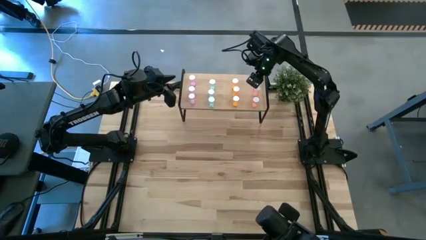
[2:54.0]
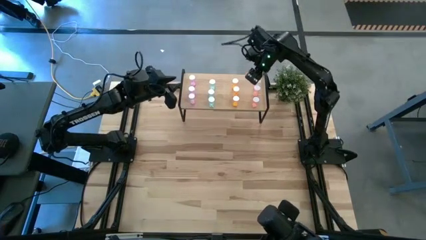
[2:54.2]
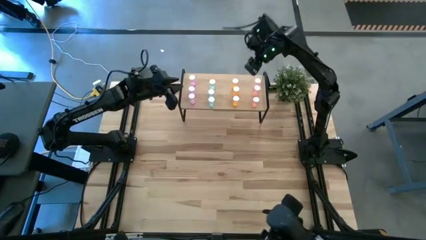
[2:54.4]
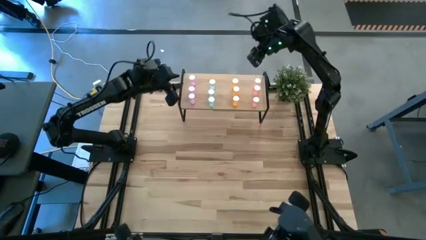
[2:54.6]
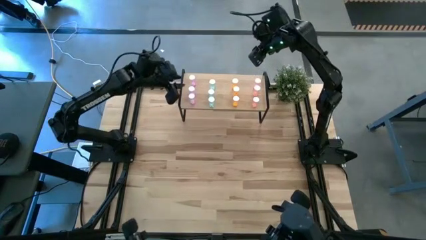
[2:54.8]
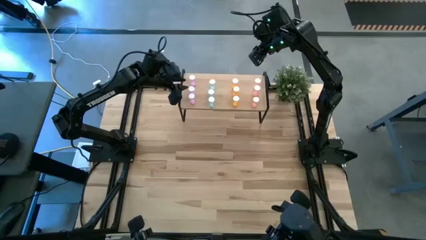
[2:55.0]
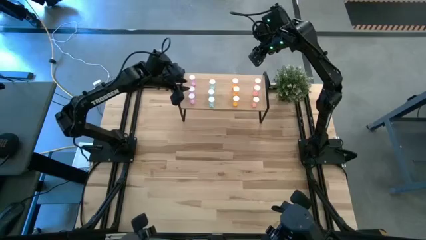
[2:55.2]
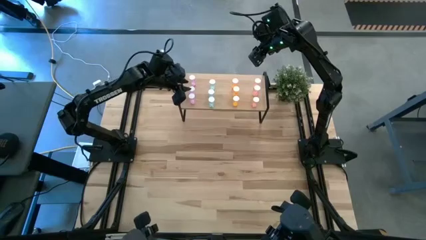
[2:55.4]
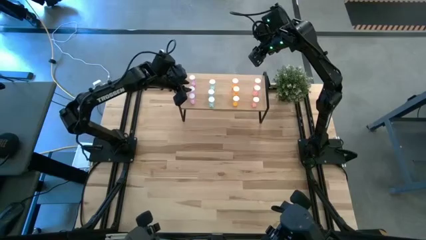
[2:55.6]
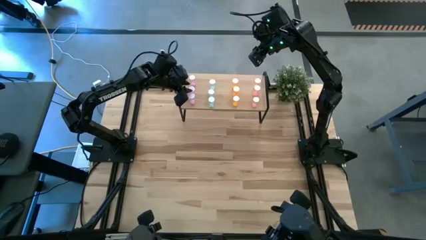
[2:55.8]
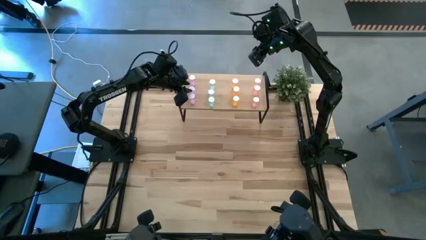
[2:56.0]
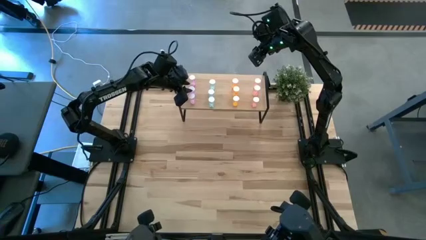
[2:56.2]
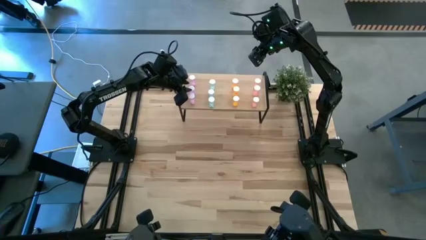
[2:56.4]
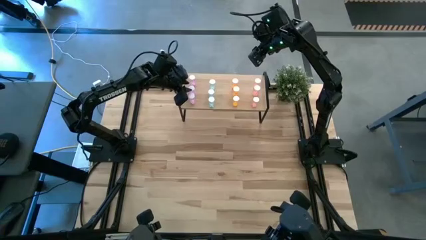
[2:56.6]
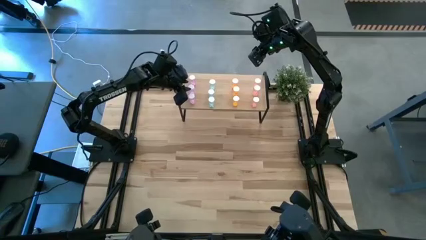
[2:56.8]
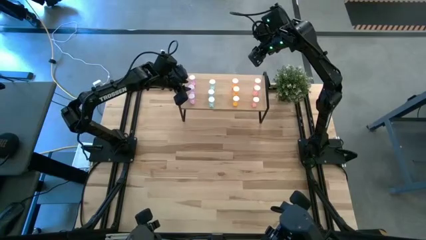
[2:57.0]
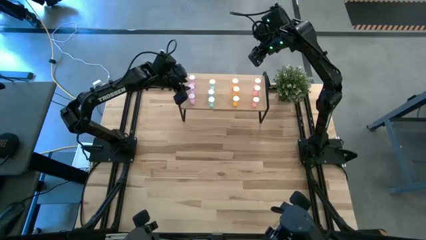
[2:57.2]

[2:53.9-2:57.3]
Task: Pick and place medicine bottles onto shelf by color
Adjust the middle violet pill bottle

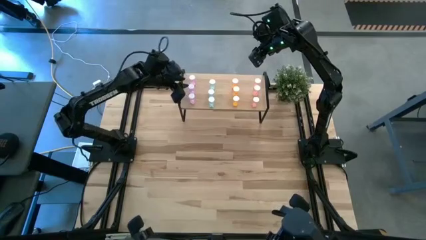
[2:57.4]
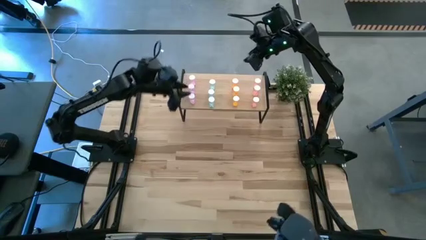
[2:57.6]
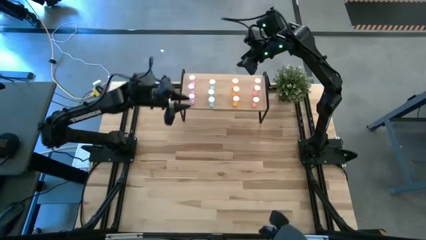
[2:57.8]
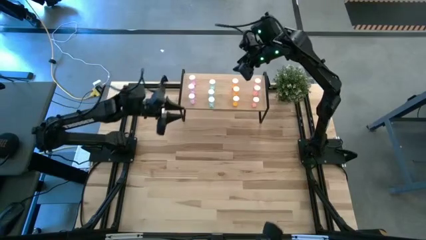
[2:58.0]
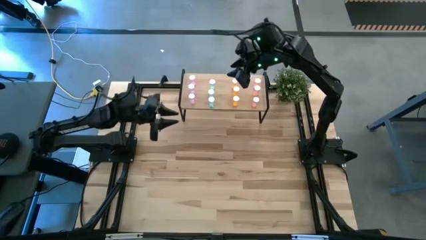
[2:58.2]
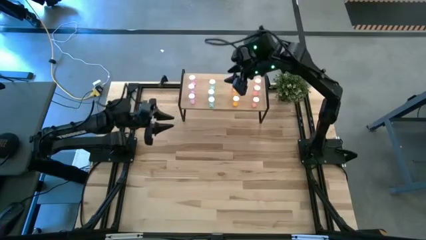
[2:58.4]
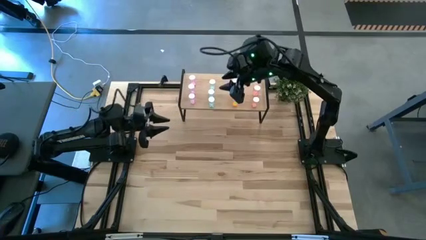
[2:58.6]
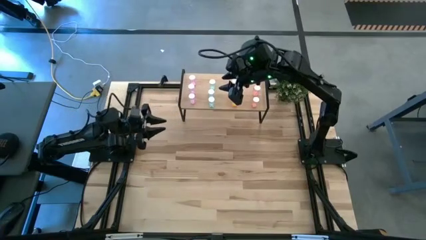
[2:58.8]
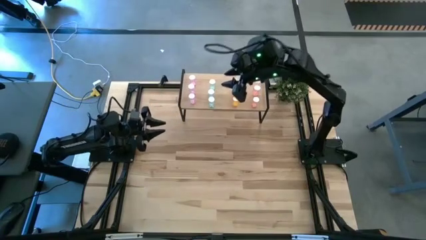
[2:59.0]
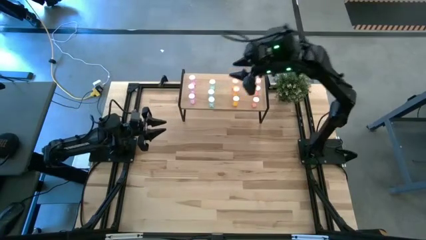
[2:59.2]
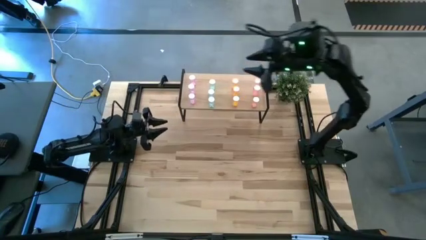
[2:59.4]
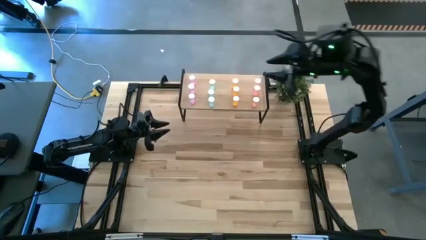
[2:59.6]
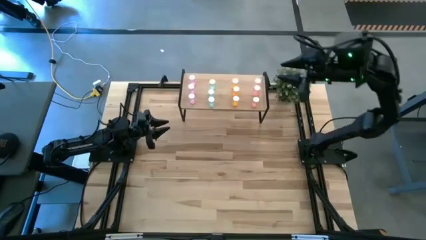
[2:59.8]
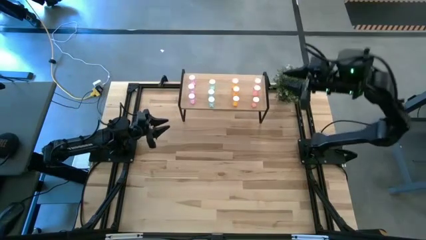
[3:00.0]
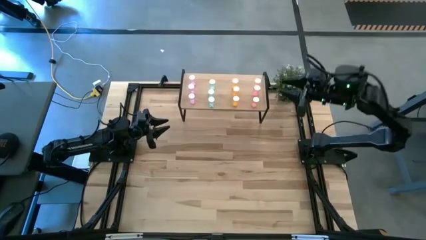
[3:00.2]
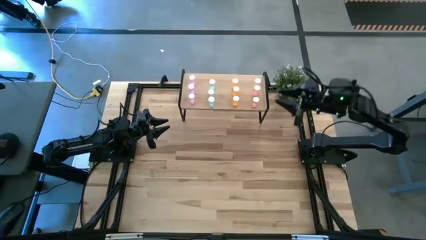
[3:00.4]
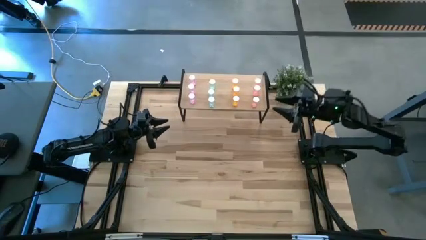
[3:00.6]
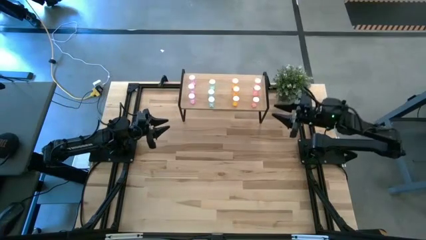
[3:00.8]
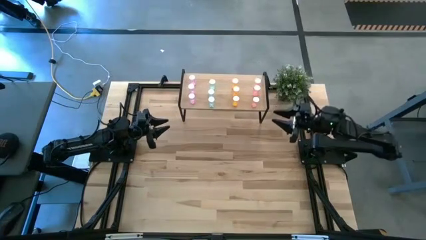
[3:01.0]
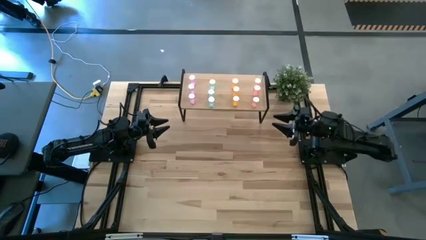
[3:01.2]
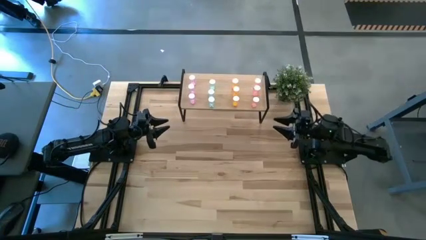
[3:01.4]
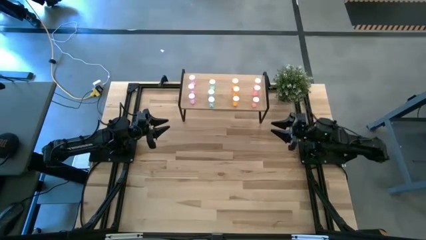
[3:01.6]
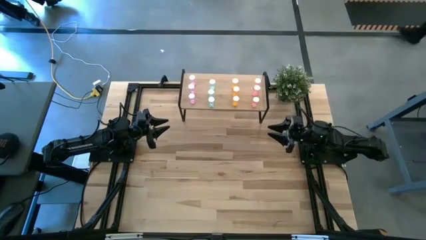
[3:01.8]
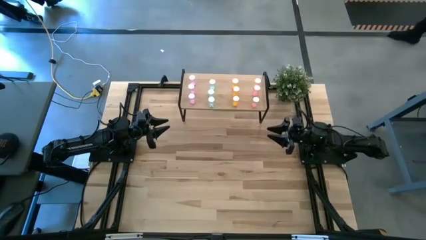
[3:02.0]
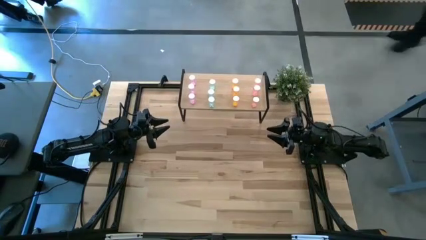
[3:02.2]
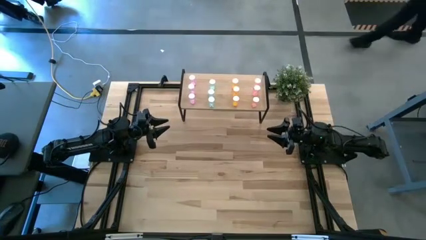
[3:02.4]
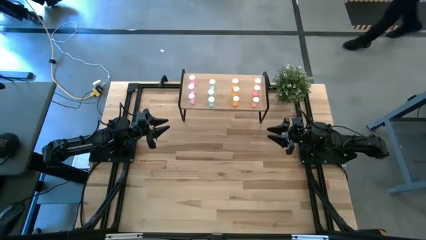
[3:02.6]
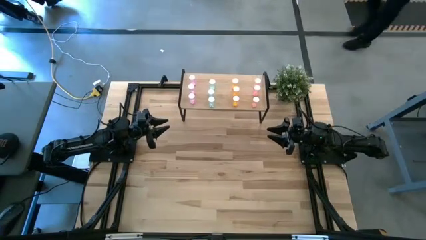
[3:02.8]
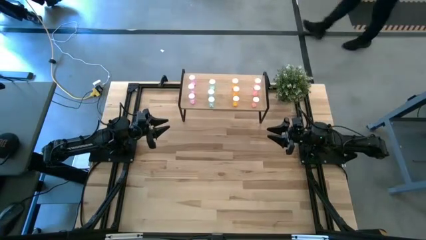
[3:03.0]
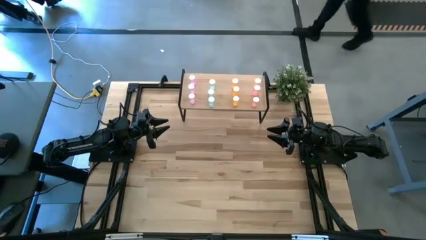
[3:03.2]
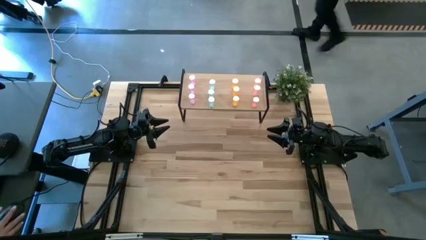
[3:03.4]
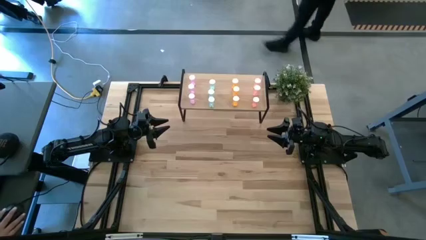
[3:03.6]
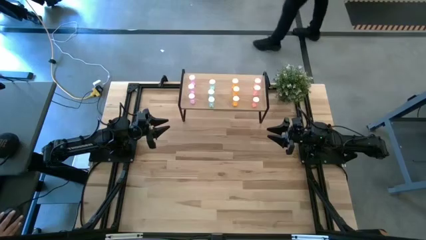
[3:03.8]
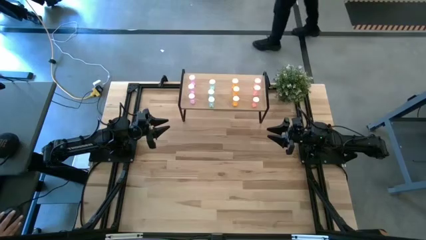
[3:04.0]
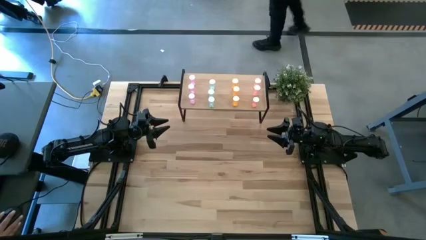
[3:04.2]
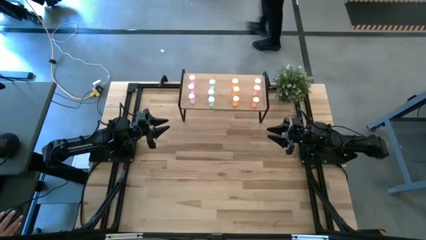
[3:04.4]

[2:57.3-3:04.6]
Return to Home Position

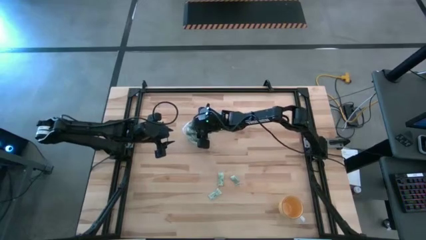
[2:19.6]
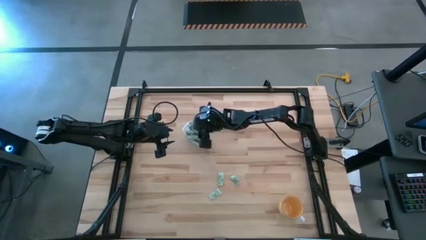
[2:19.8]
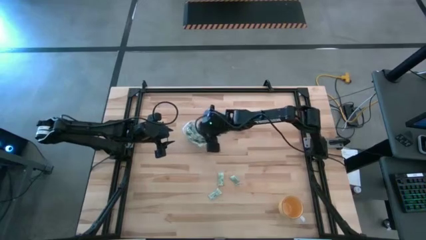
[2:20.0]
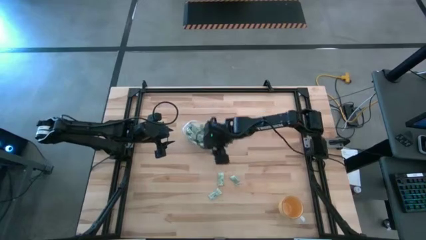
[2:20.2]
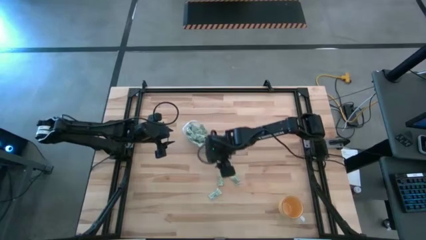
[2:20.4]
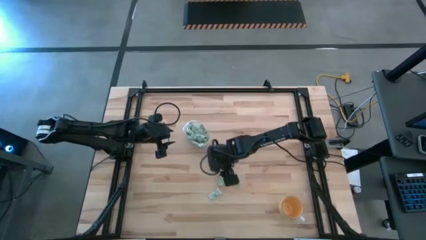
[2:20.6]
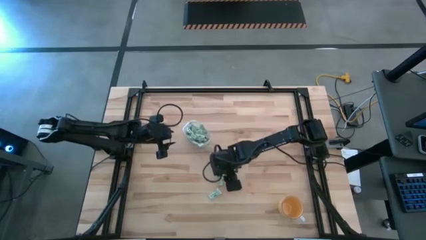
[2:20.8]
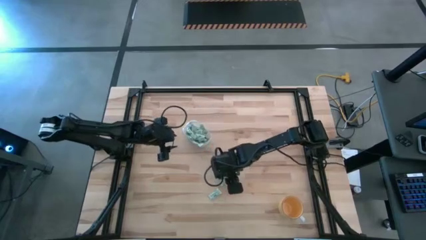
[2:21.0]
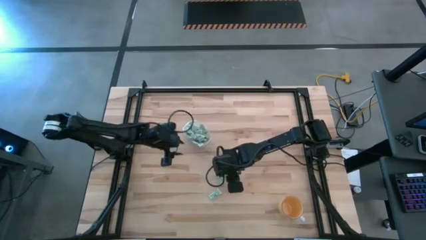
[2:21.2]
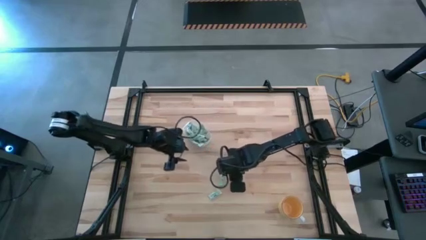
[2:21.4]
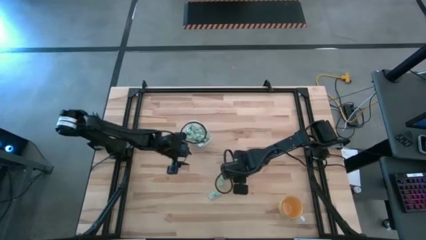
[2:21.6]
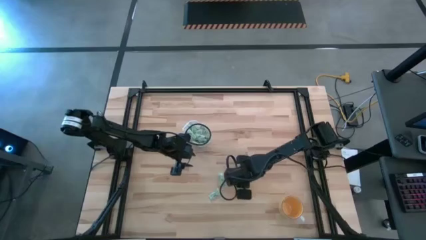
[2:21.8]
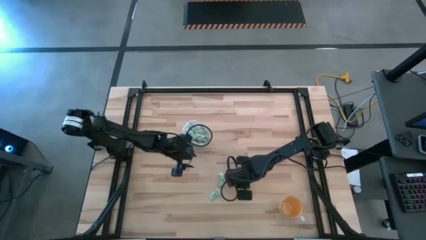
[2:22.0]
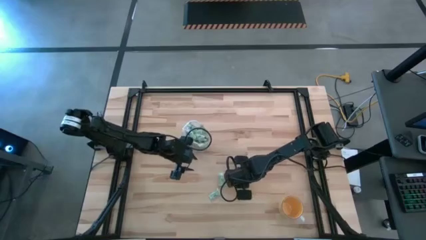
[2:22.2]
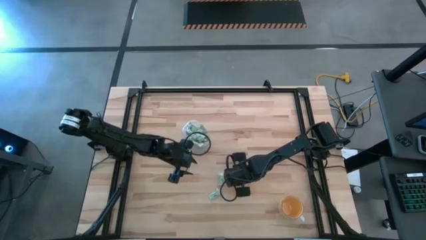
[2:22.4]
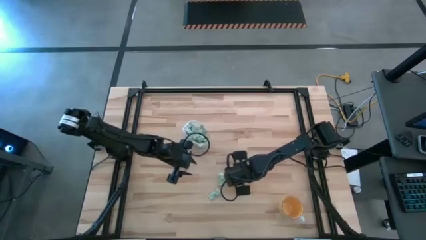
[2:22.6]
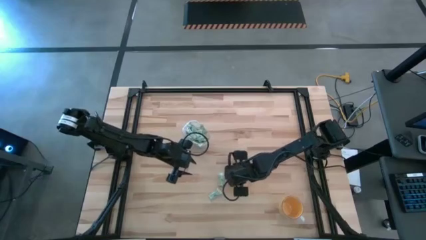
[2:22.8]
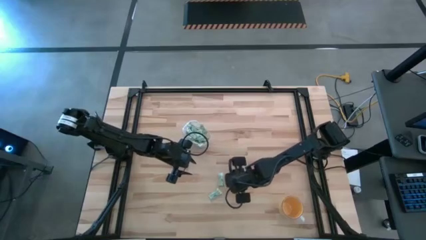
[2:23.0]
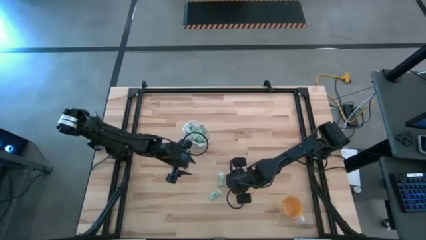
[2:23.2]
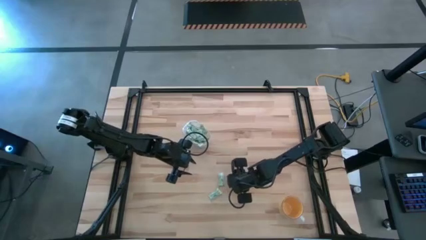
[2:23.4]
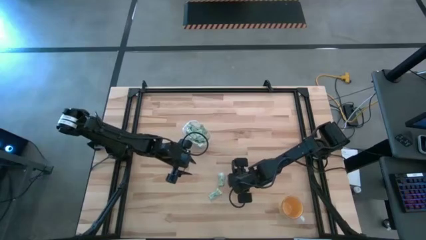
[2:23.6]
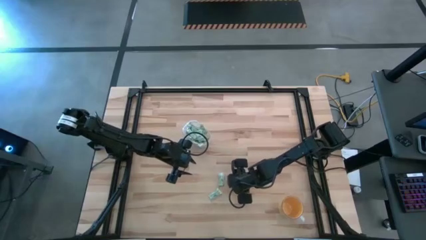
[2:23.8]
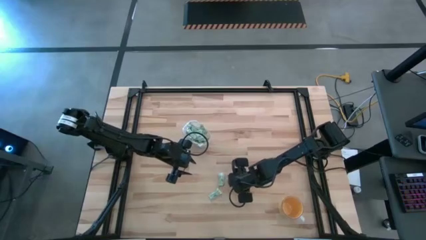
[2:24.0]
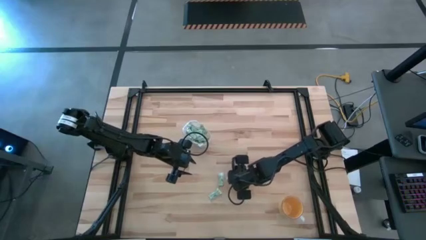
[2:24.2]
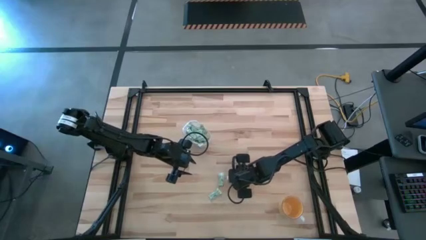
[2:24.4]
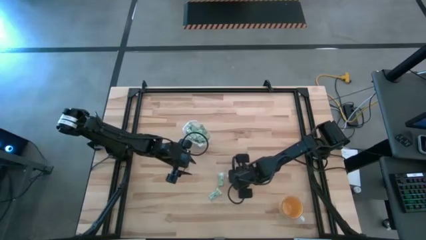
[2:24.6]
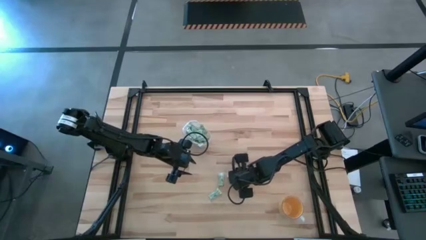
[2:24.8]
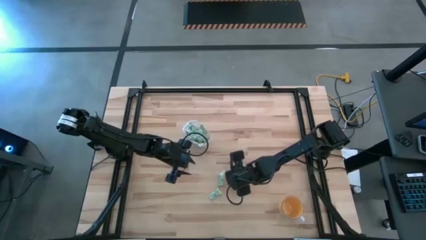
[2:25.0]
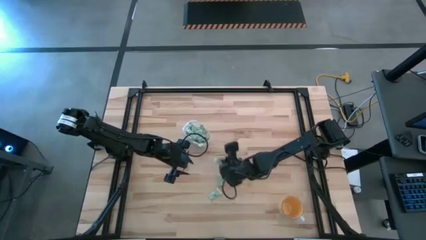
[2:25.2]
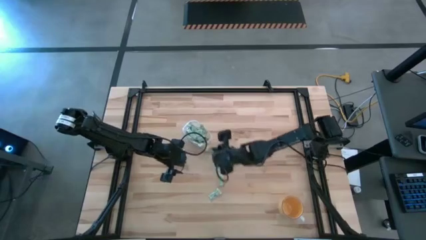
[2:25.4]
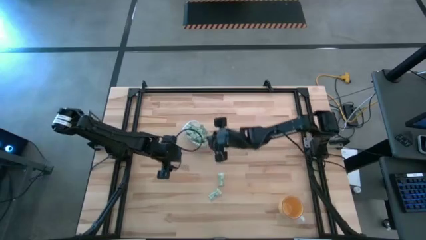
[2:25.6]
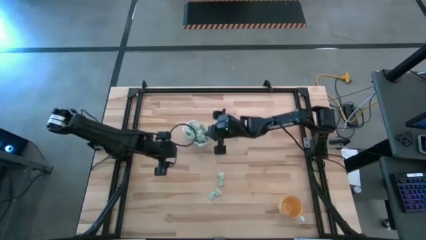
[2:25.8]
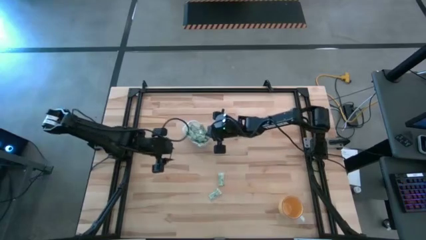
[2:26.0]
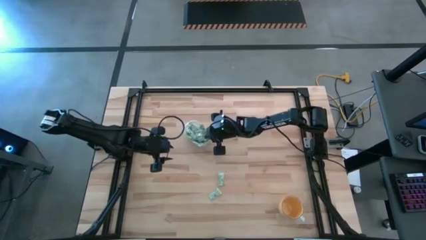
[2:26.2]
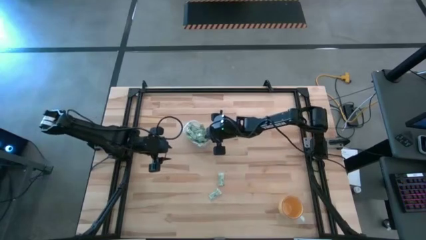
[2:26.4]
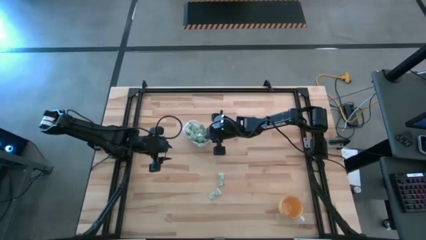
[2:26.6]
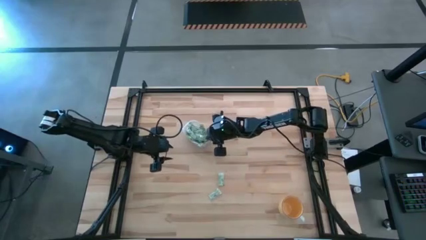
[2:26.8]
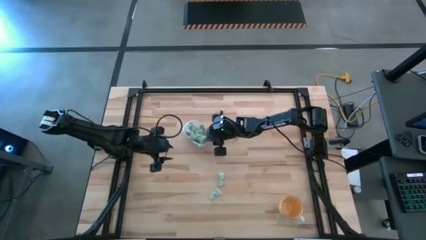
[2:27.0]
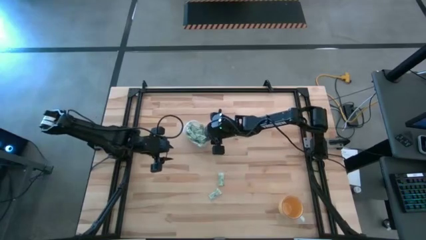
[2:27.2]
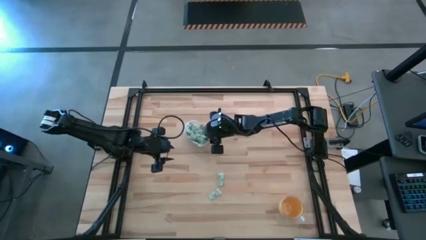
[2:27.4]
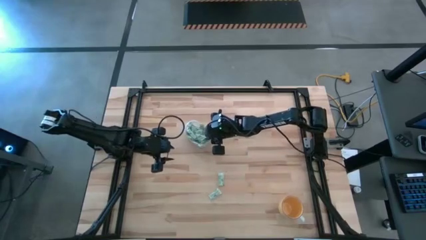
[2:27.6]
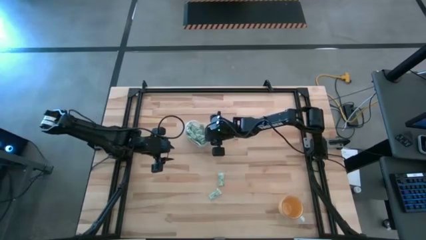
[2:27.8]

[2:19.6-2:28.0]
Task: Pick and place Stevia / Truvia into bins
Put the stevia packet into the transparent bin
